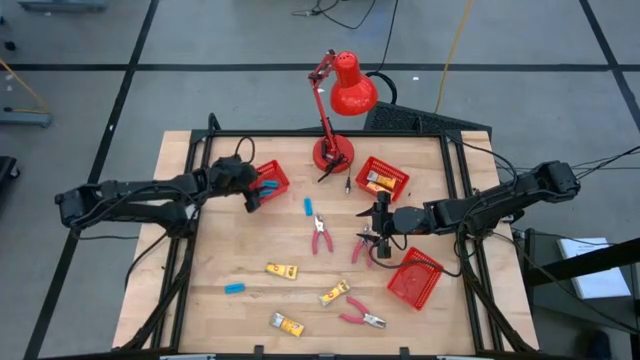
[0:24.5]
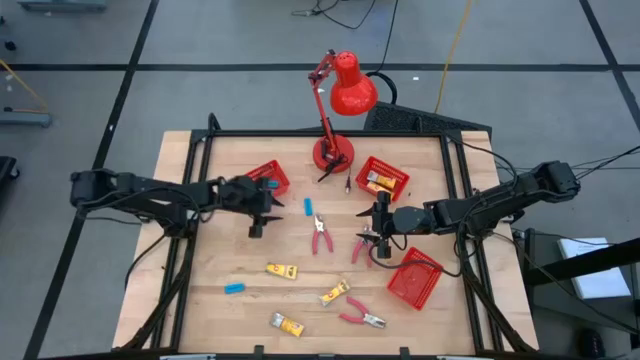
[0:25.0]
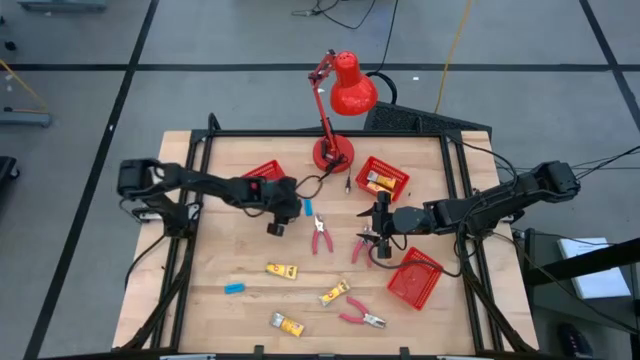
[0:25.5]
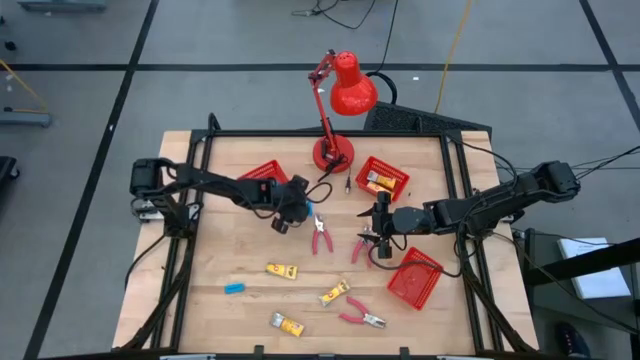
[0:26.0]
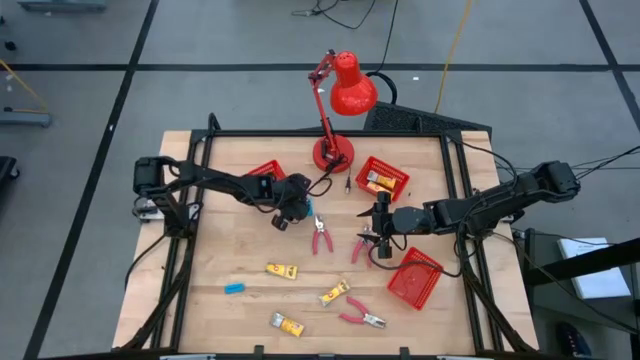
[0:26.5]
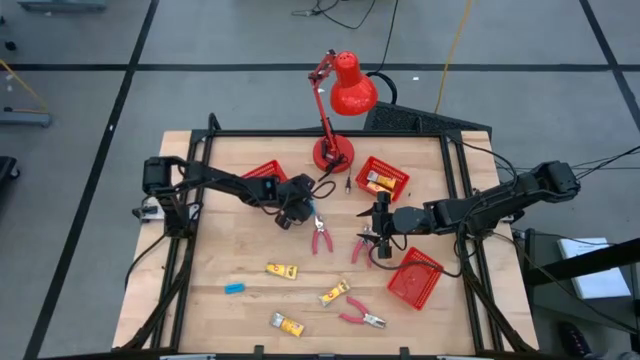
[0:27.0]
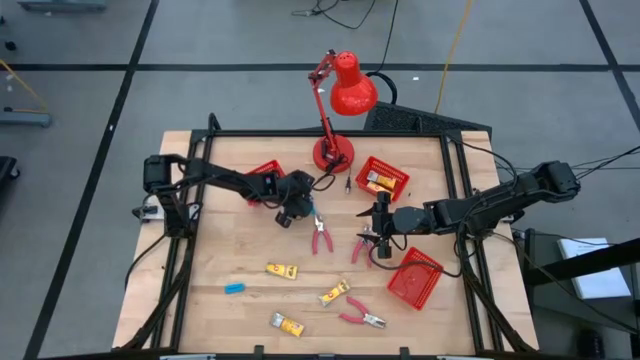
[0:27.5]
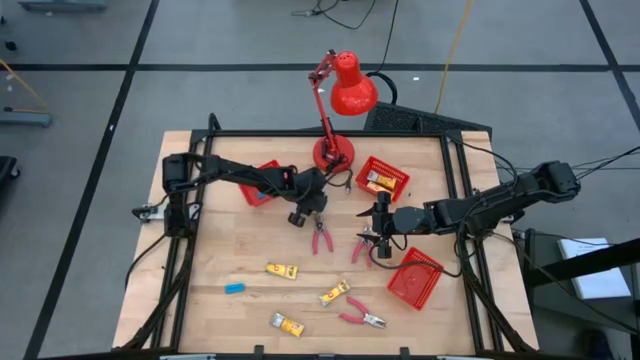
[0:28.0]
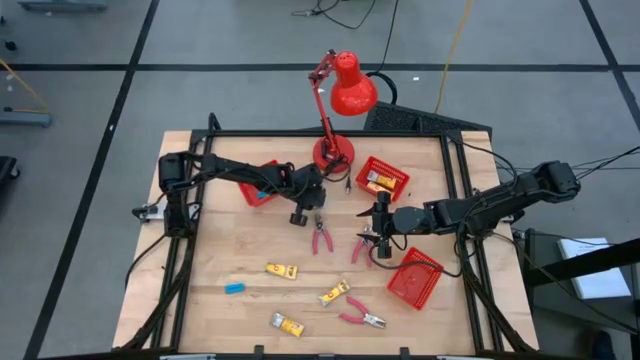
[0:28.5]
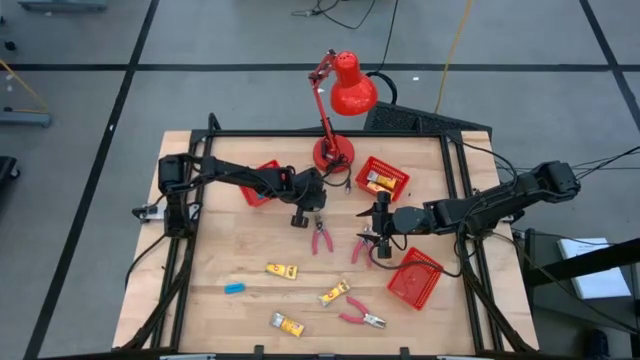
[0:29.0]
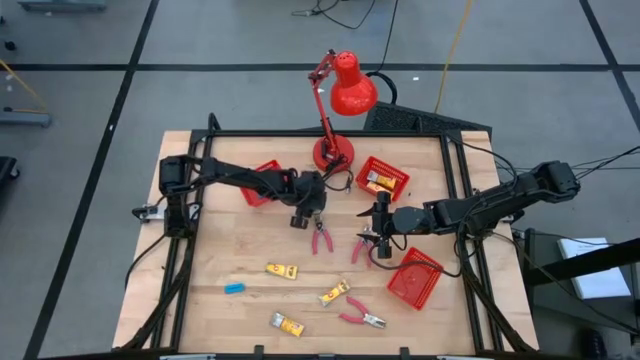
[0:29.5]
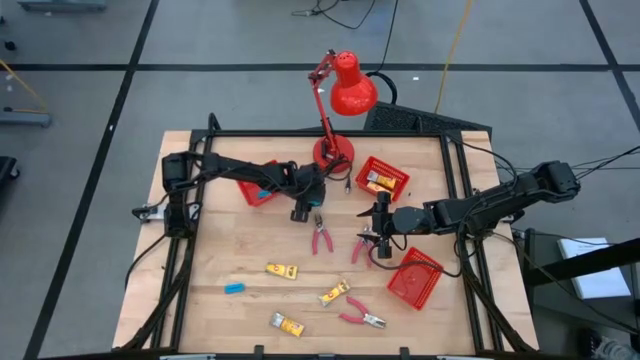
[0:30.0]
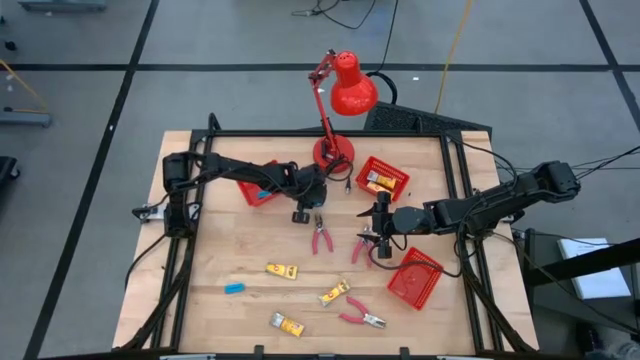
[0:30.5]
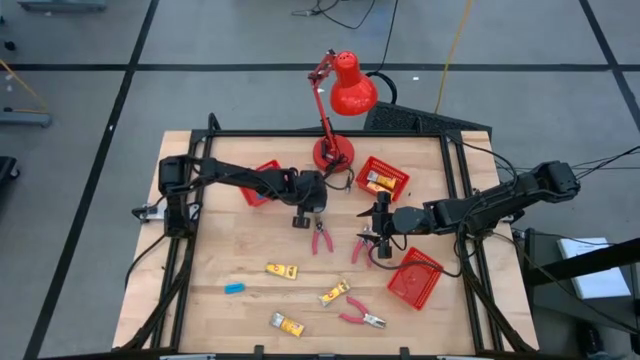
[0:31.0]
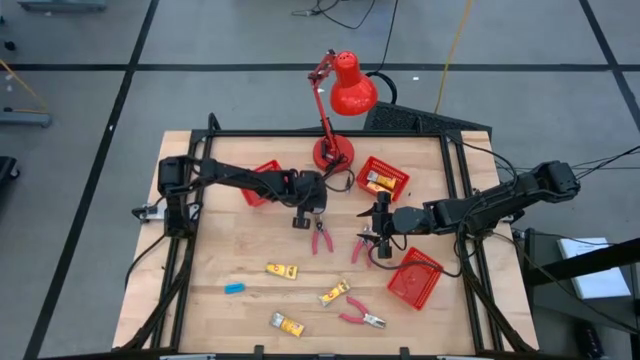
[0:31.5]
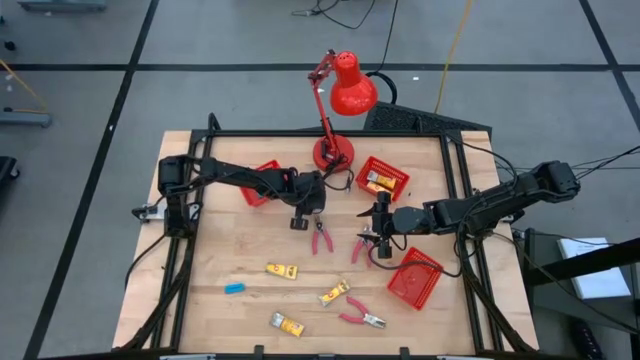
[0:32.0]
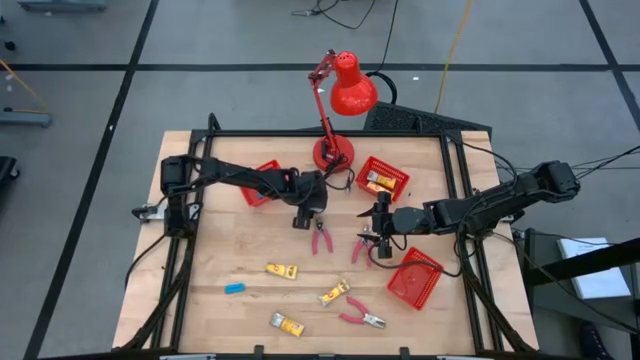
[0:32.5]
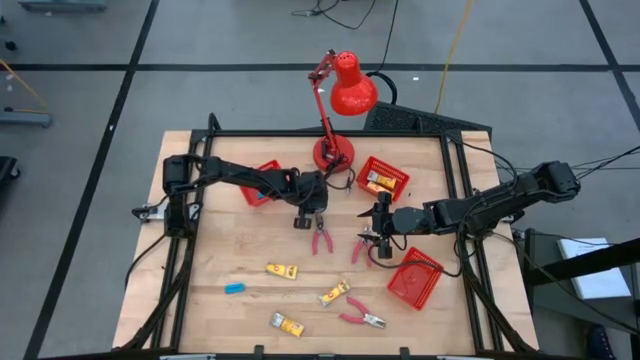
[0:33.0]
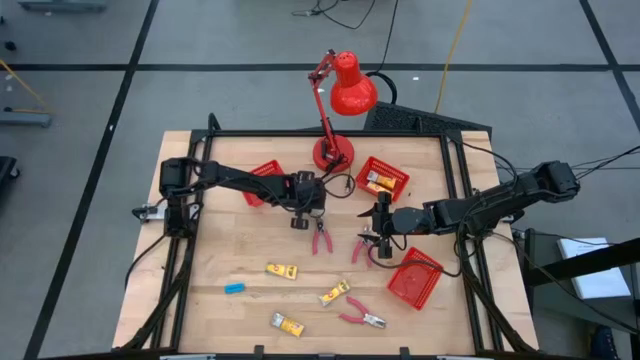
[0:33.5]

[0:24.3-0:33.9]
Task: Pick & Place School Supplies
Put the blue eraser into the left red bin

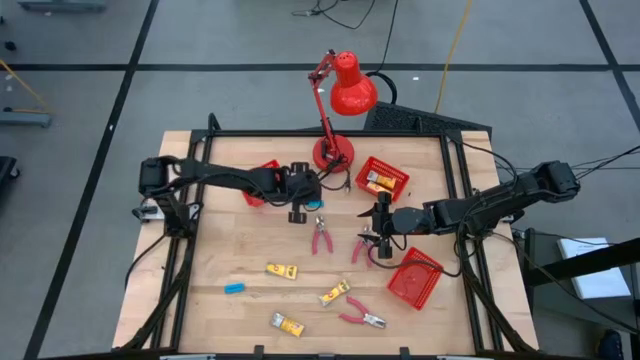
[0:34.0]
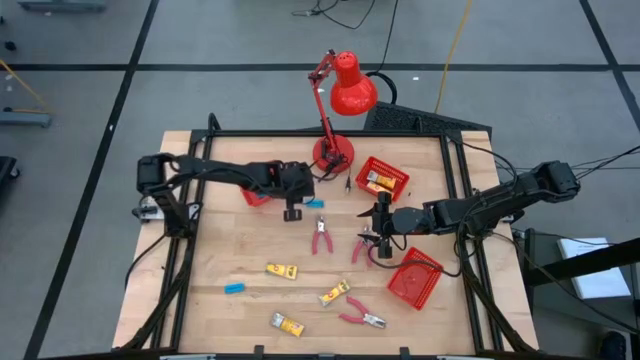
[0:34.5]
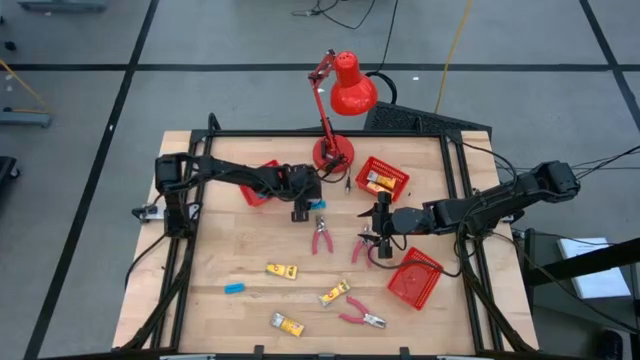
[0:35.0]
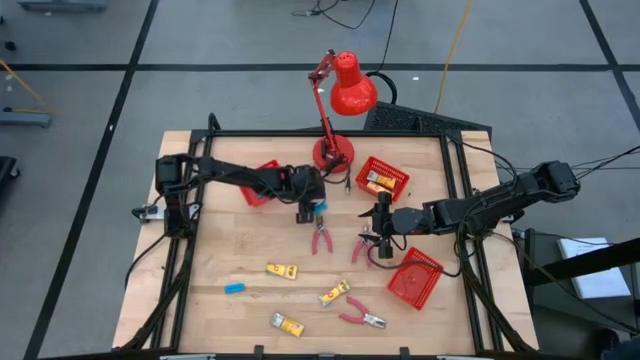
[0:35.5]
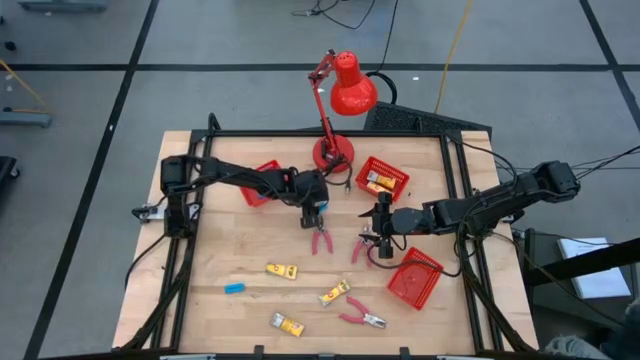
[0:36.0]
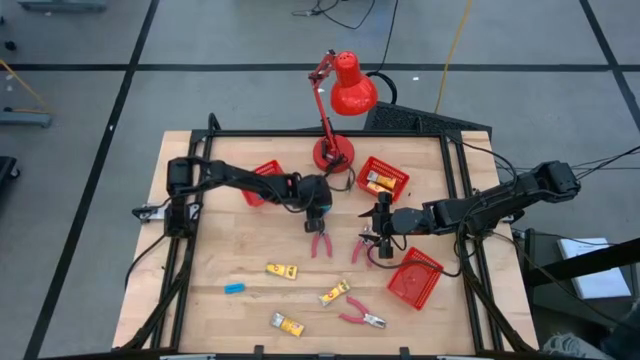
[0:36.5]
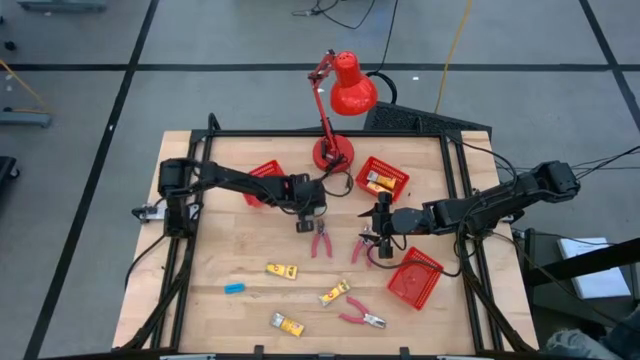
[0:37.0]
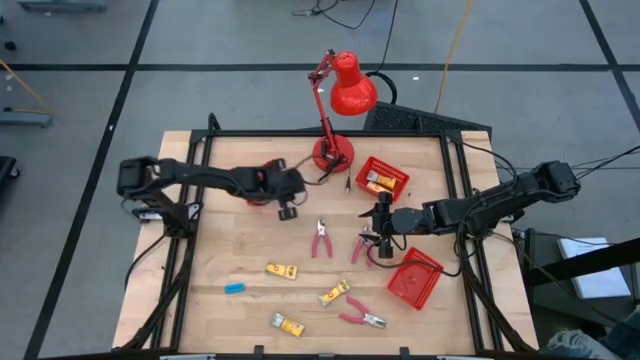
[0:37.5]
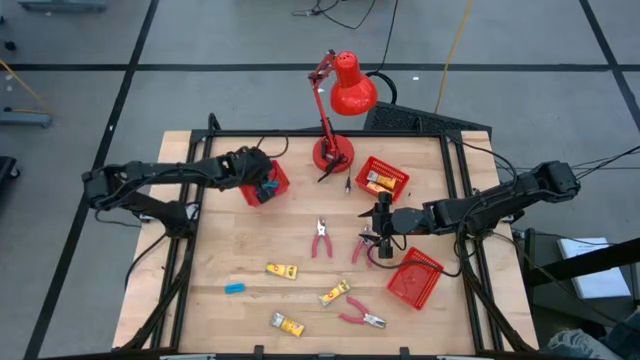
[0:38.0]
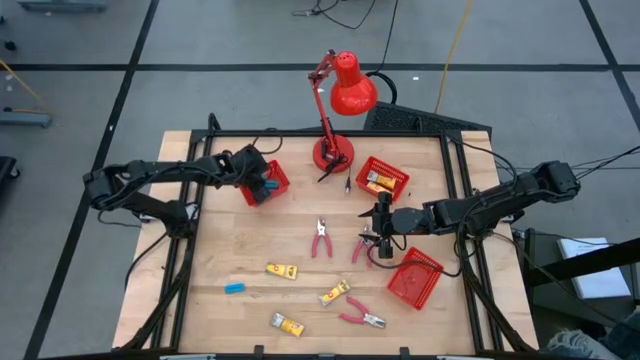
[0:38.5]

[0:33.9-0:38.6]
Put the blue eraser into the left red bin

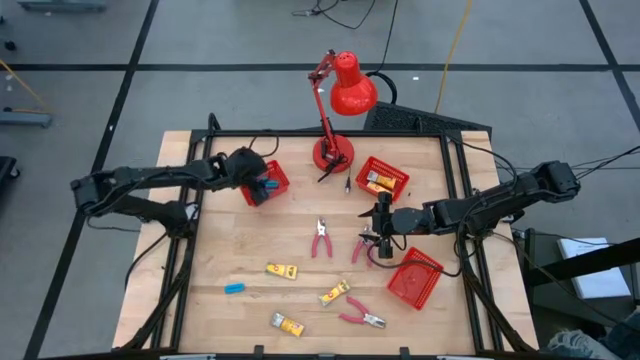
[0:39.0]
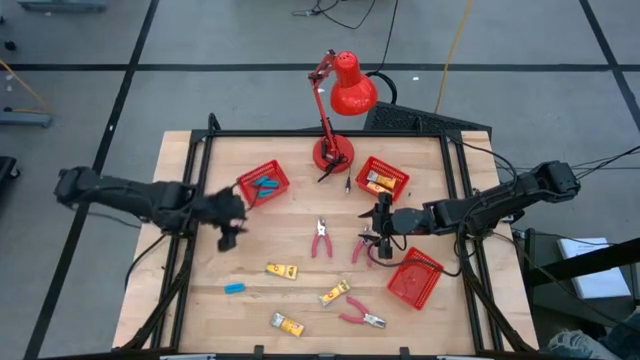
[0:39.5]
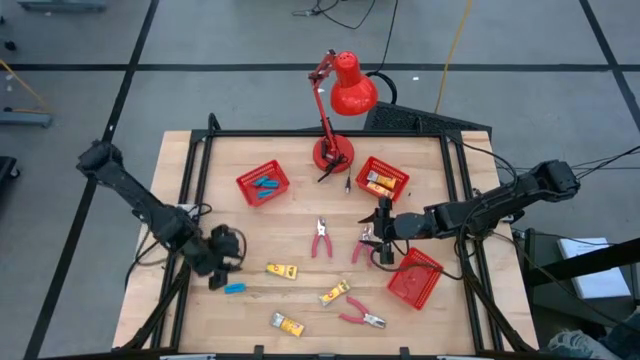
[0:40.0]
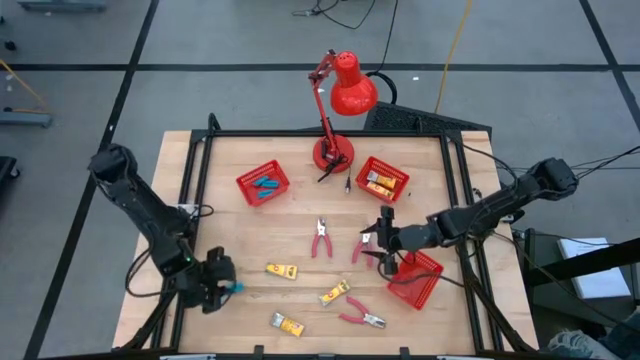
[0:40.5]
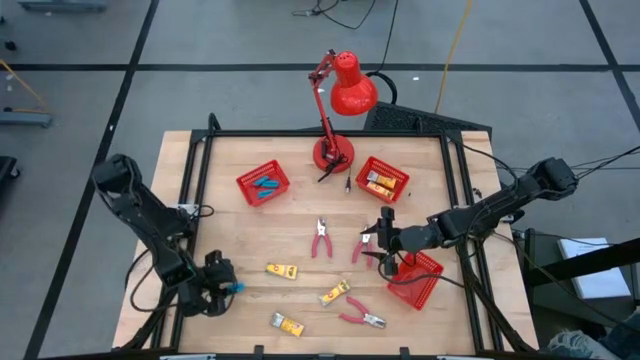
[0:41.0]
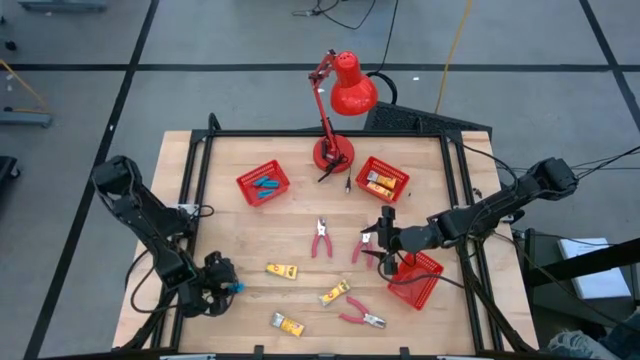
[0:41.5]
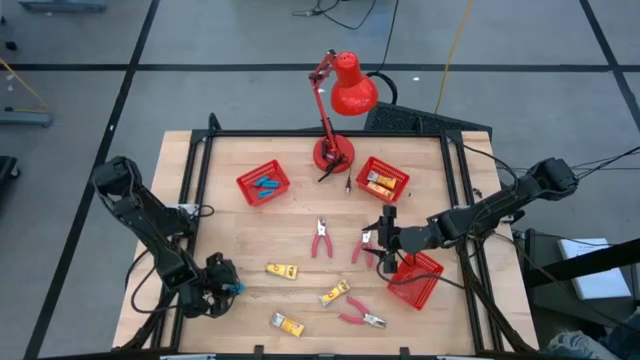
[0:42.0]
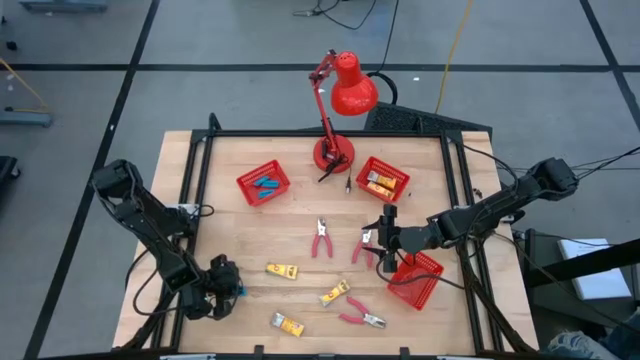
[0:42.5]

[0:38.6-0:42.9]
Put the blue eraser into the left red bin

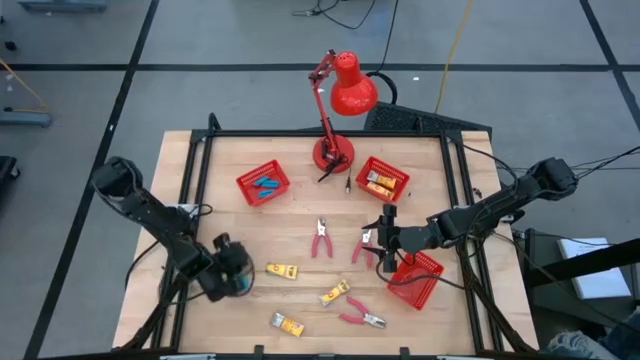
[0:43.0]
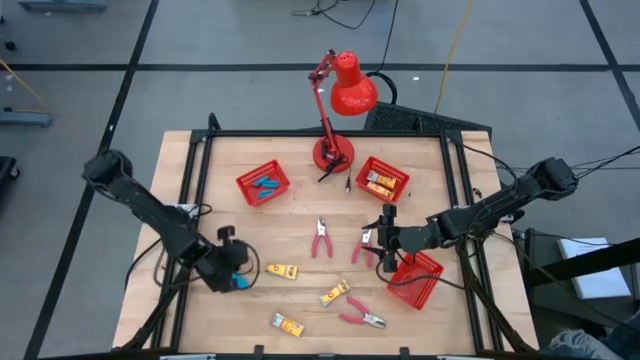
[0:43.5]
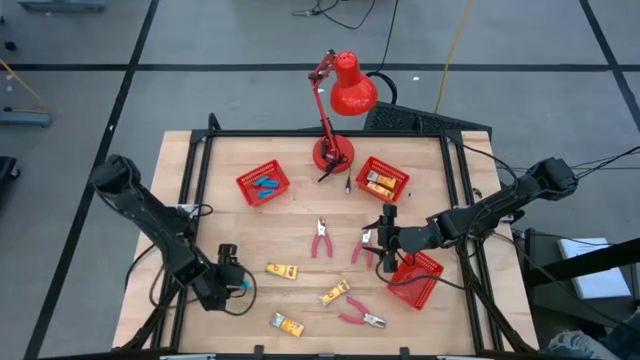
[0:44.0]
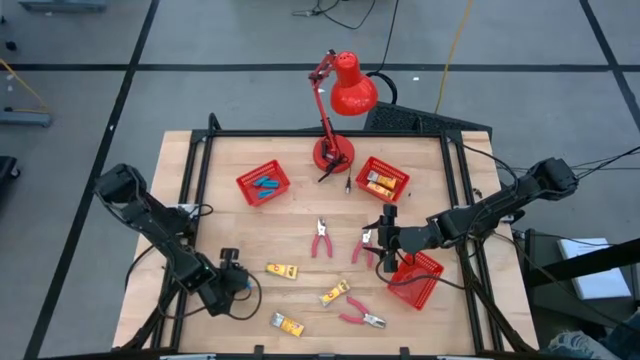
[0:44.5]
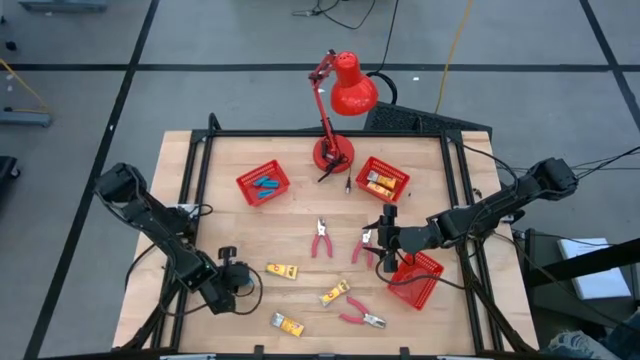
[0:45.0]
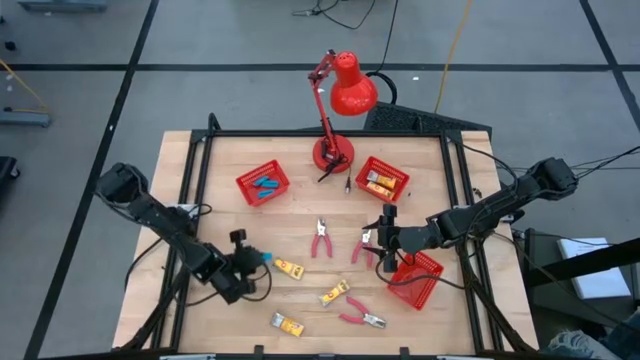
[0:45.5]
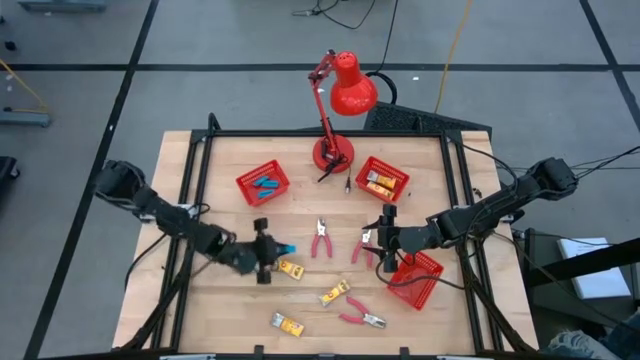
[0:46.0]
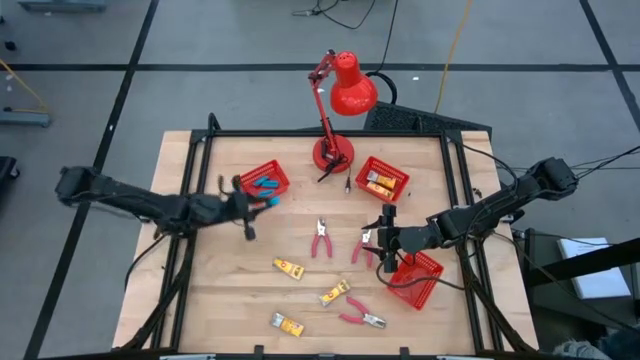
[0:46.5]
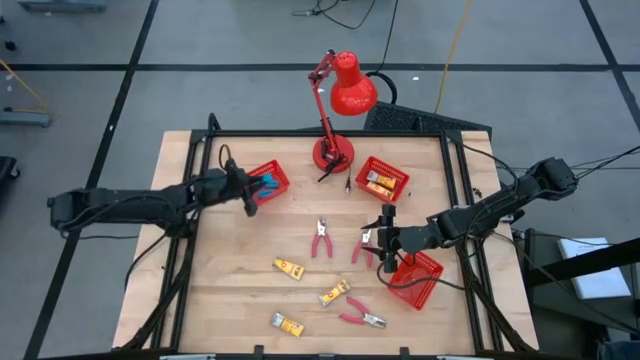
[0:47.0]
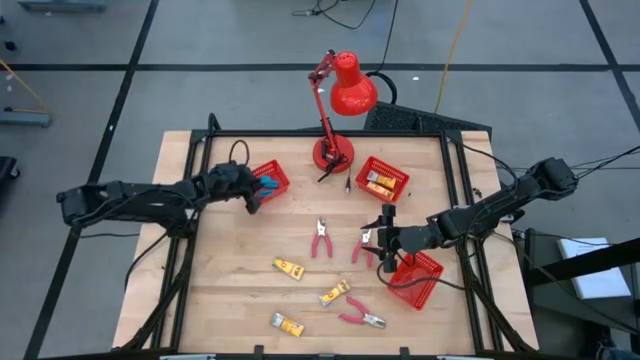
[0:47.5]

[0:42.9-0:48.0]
Put the blue eraser into the left red bin
